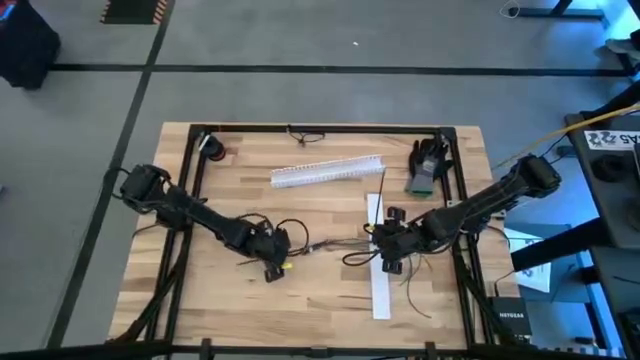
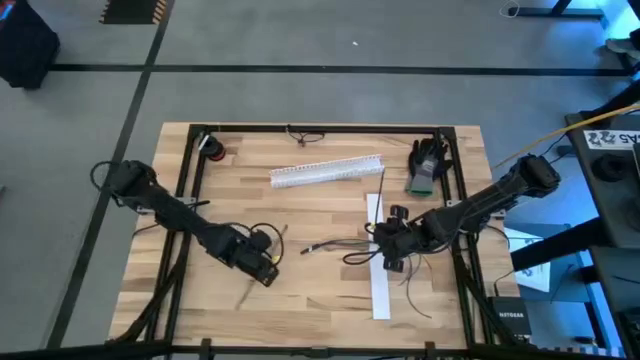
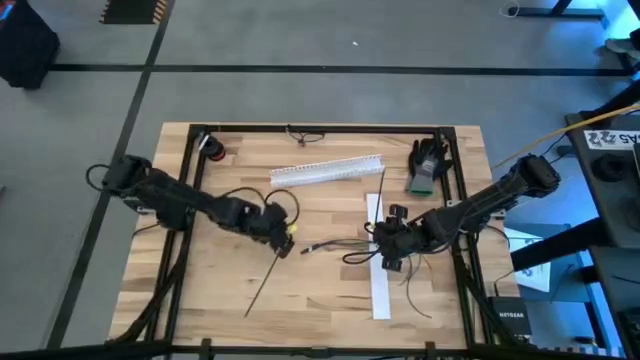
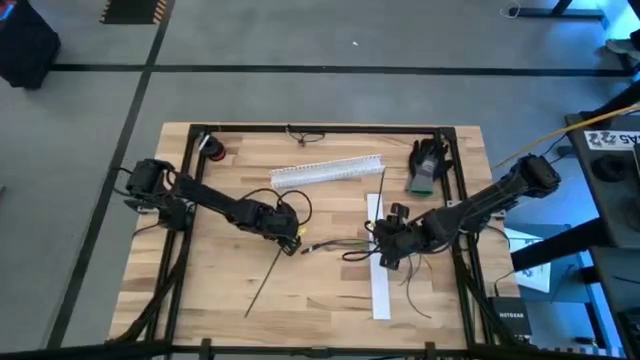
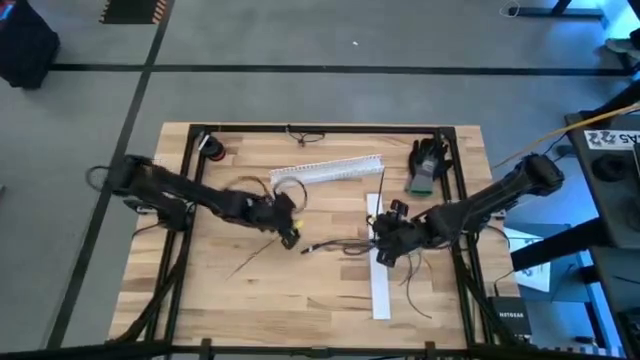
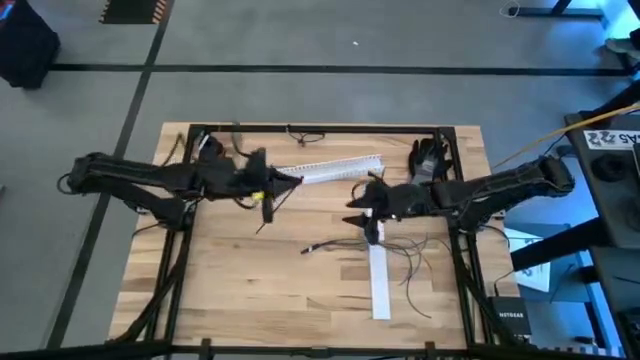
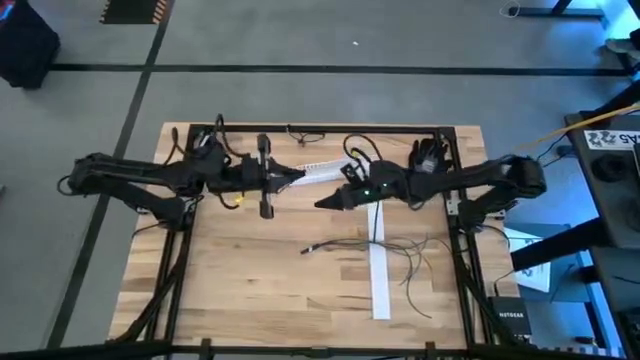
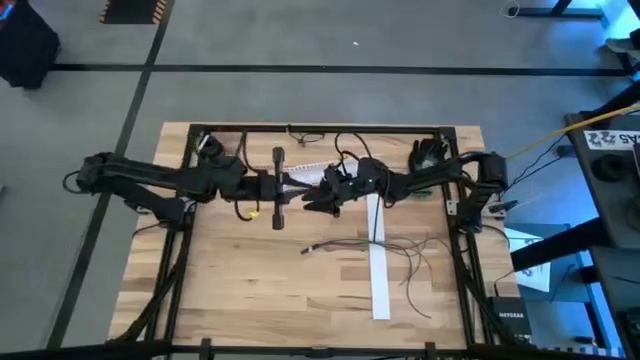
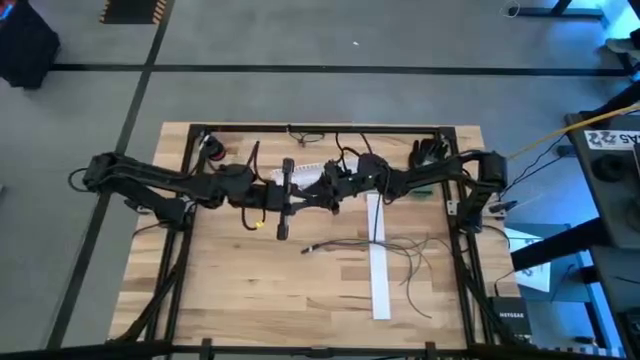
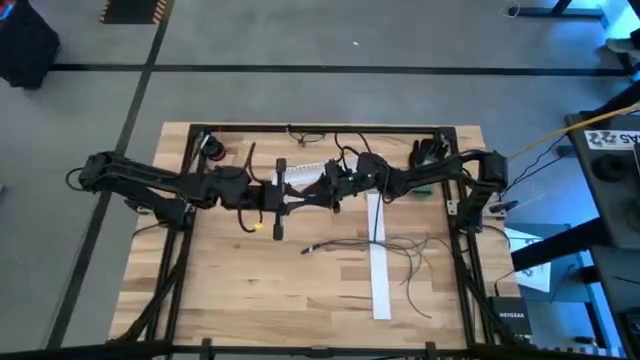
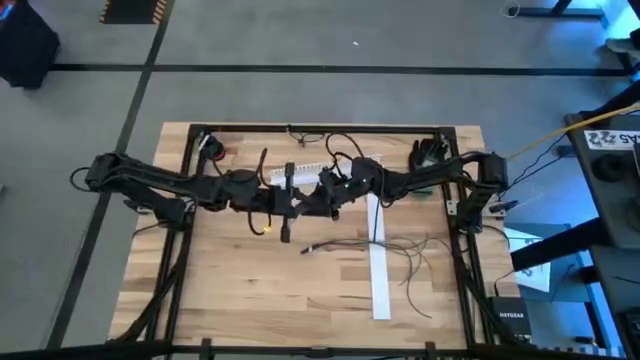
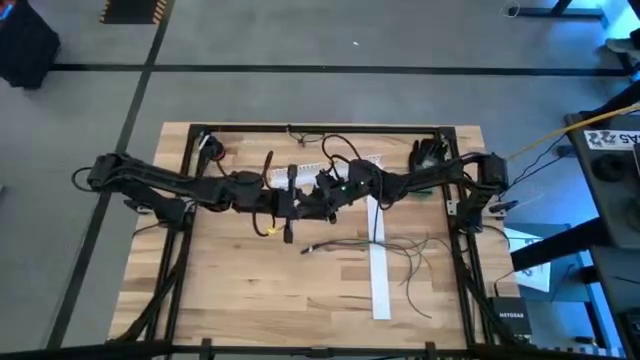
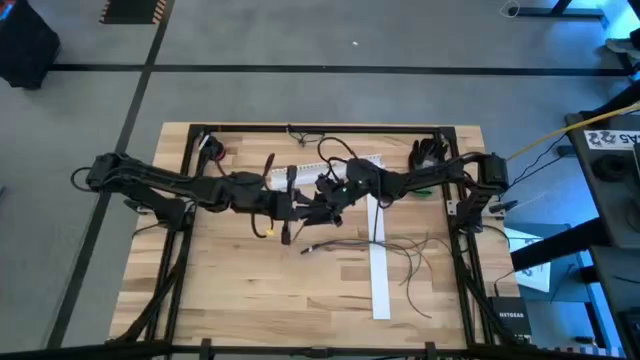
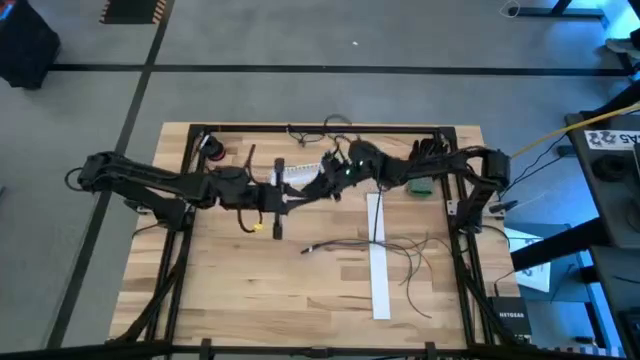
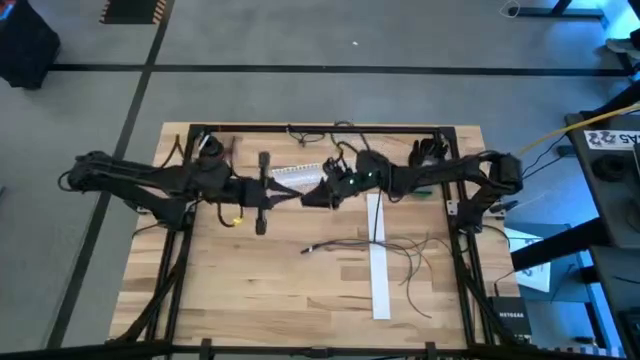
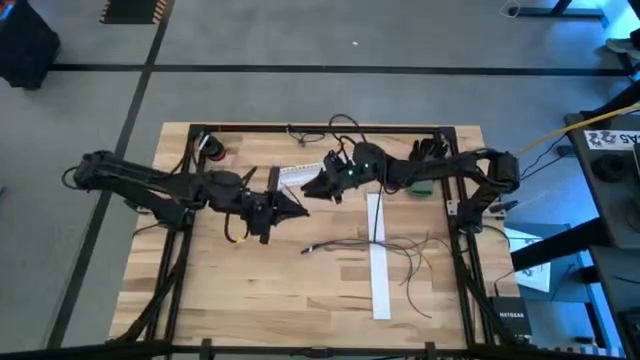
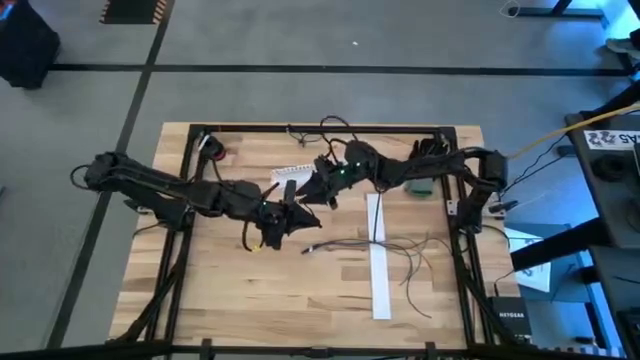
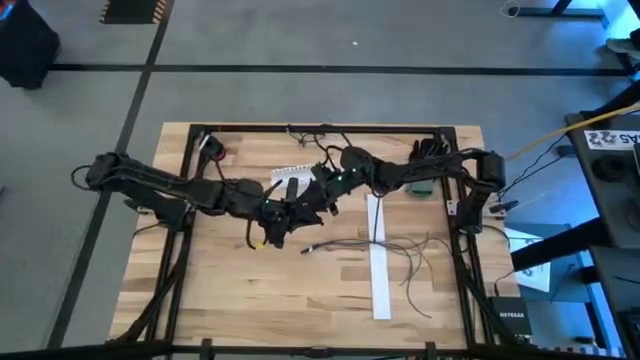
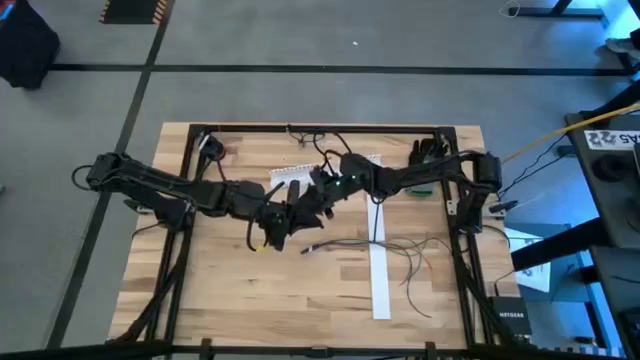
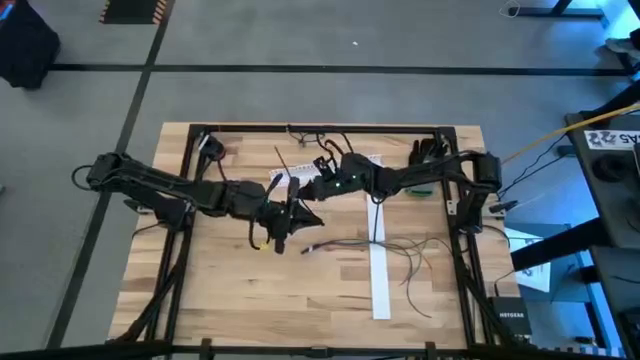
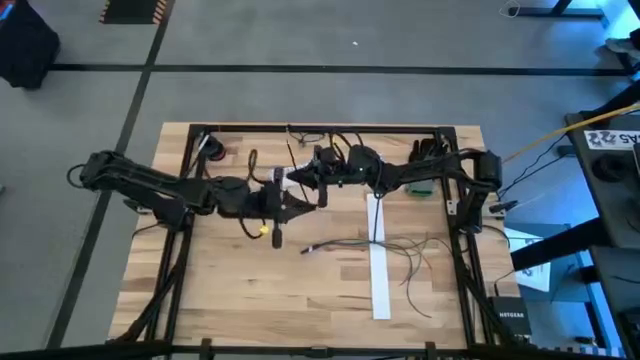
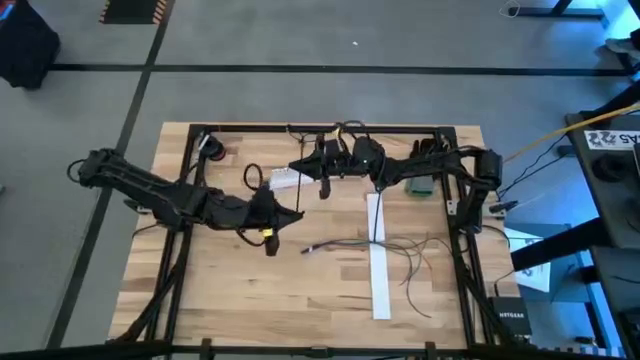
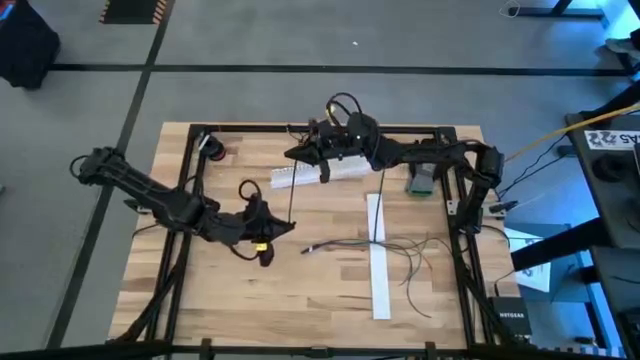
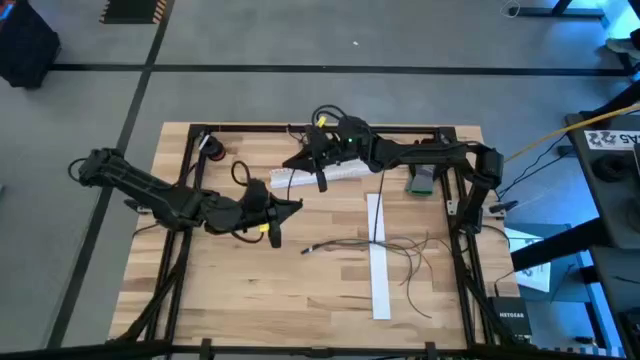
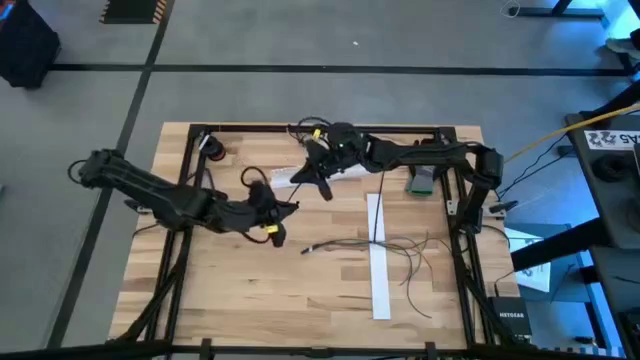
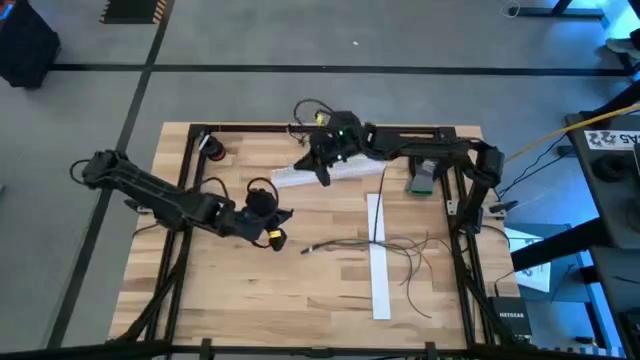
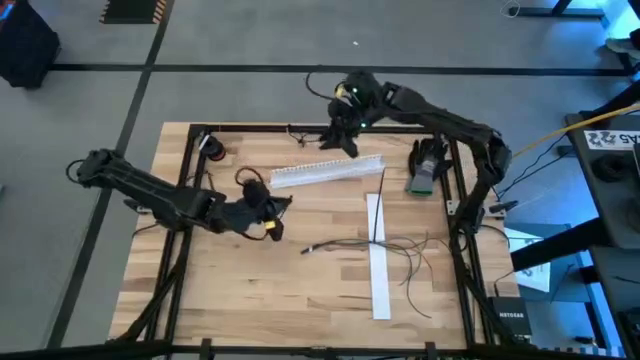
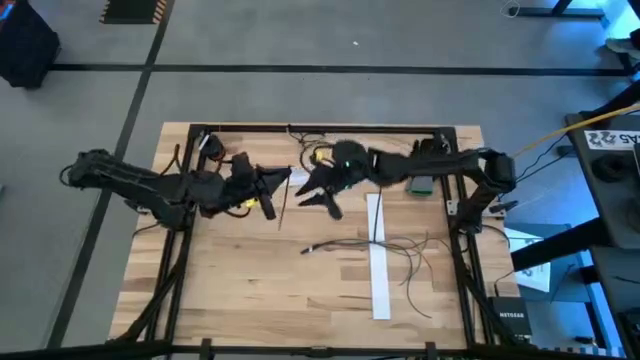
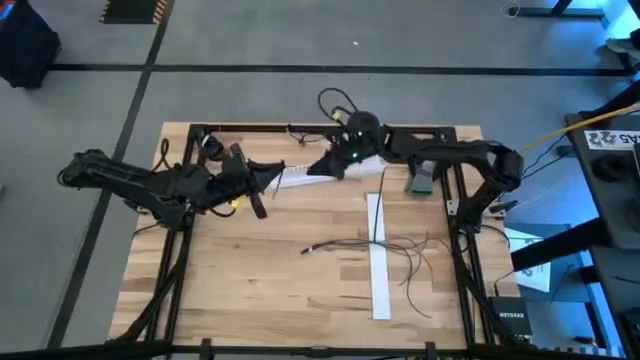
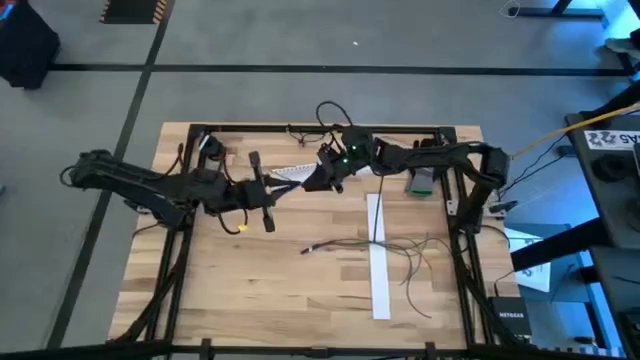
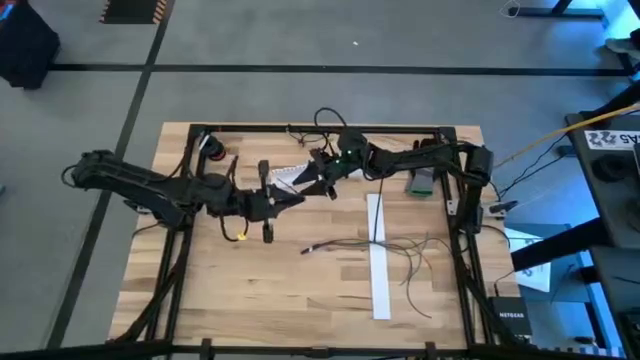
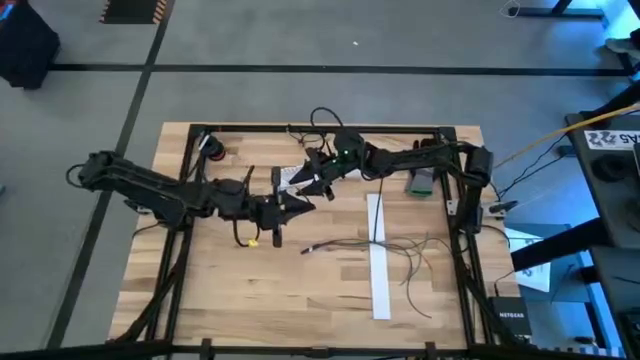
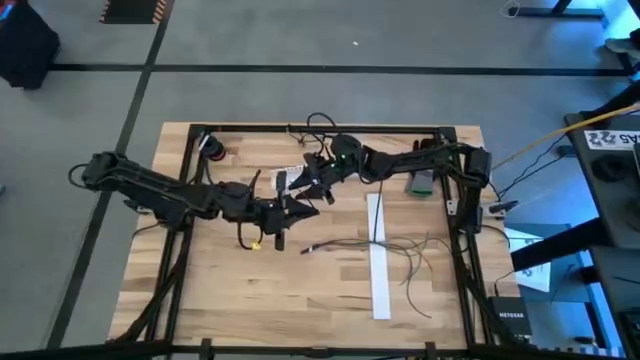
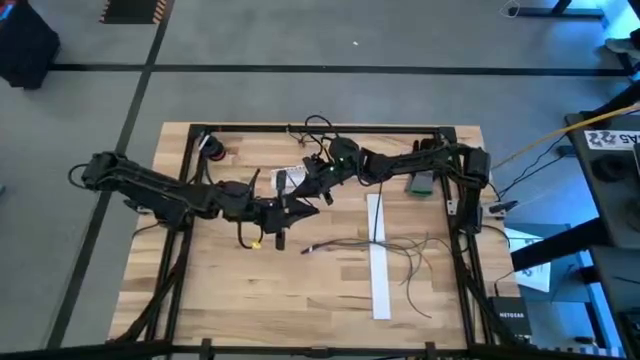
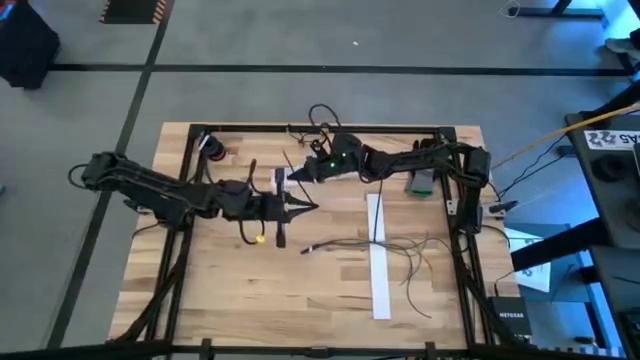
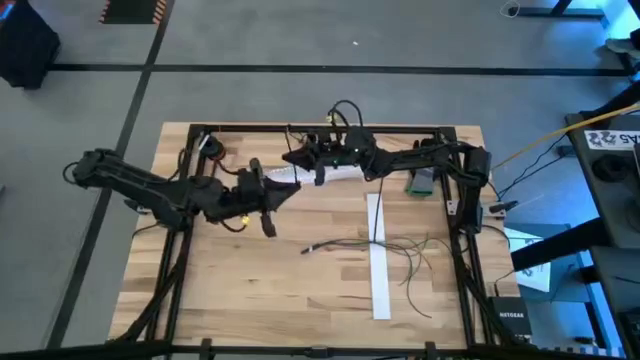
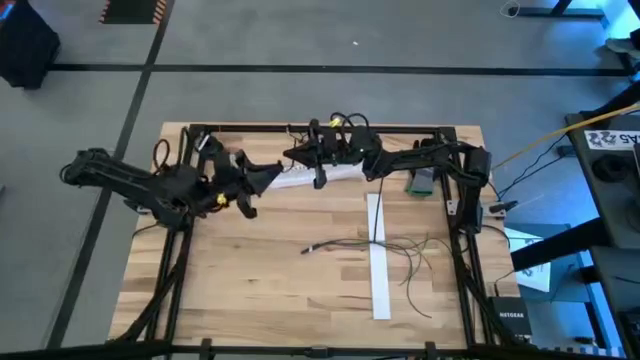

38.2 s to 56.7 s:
Task: Ziptie cables
Wrap the black zip-tie around the cable wires
